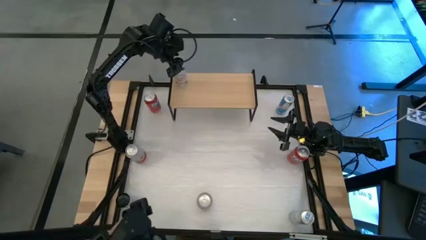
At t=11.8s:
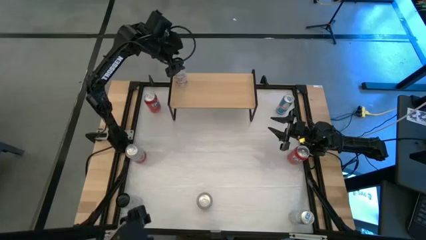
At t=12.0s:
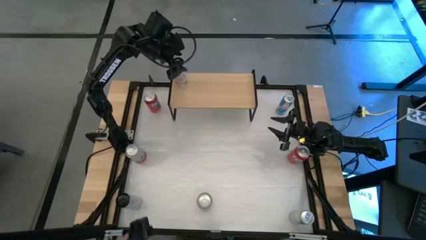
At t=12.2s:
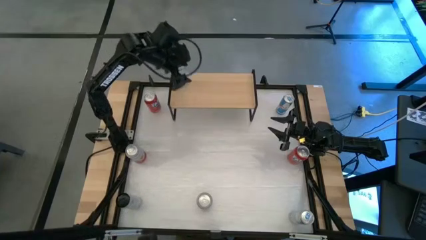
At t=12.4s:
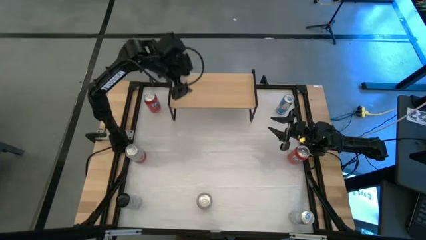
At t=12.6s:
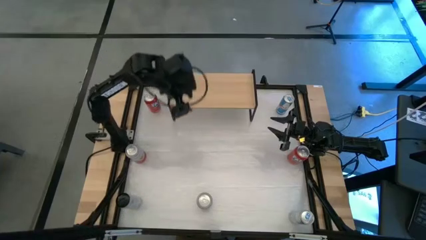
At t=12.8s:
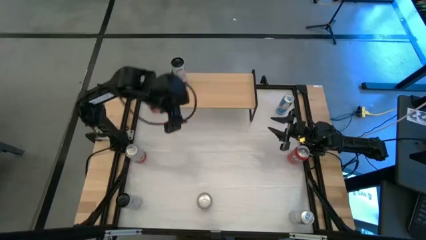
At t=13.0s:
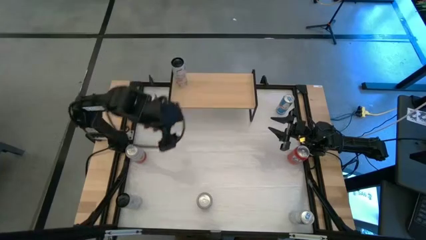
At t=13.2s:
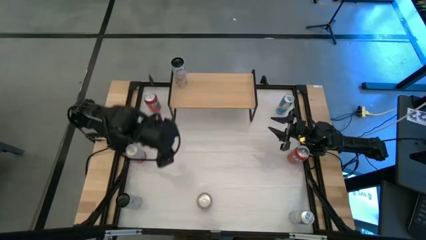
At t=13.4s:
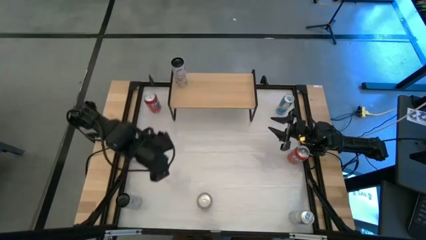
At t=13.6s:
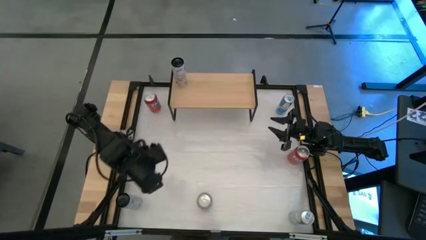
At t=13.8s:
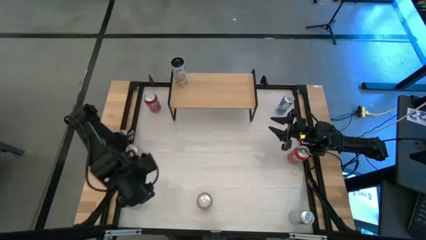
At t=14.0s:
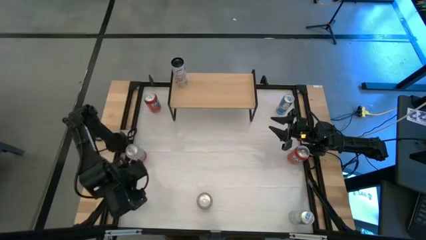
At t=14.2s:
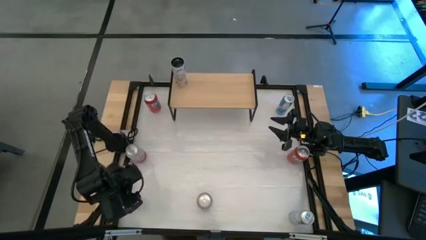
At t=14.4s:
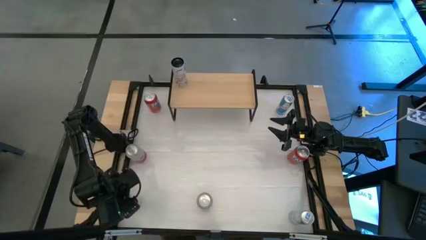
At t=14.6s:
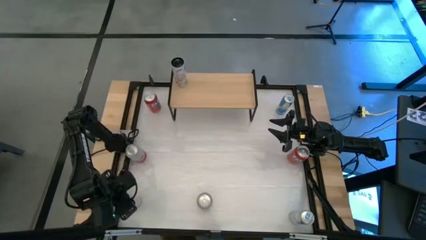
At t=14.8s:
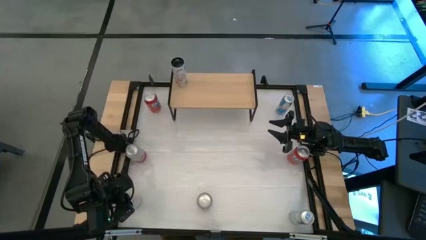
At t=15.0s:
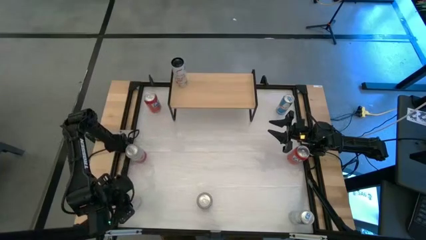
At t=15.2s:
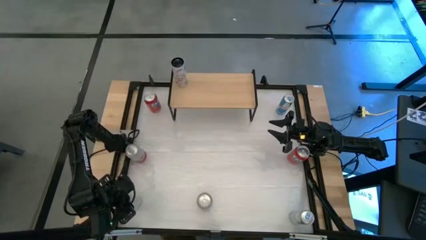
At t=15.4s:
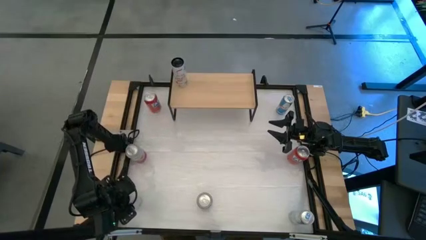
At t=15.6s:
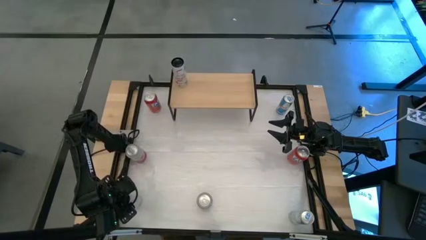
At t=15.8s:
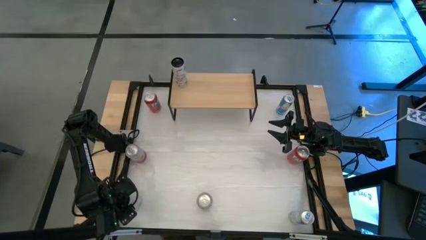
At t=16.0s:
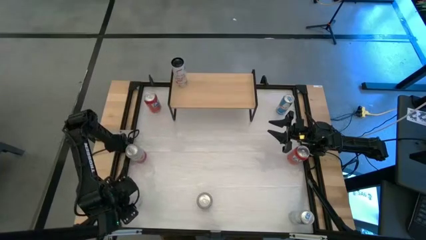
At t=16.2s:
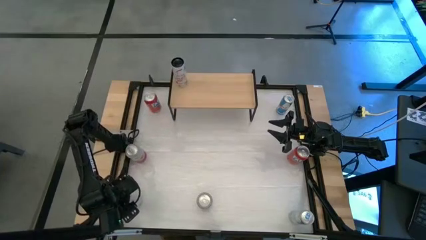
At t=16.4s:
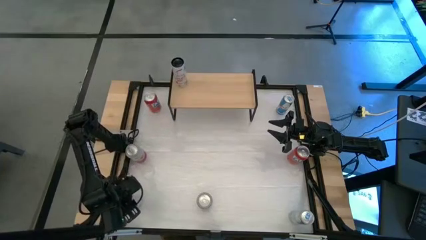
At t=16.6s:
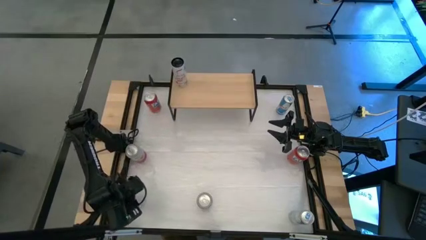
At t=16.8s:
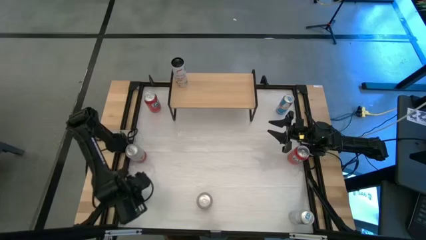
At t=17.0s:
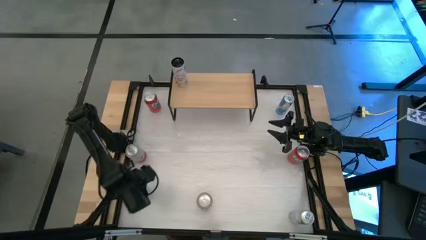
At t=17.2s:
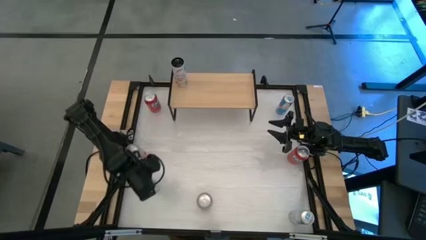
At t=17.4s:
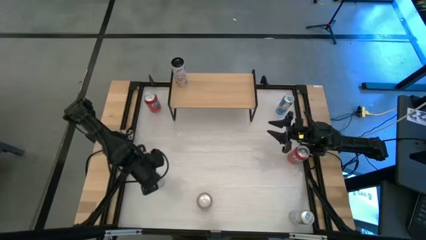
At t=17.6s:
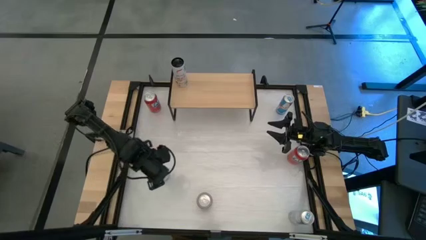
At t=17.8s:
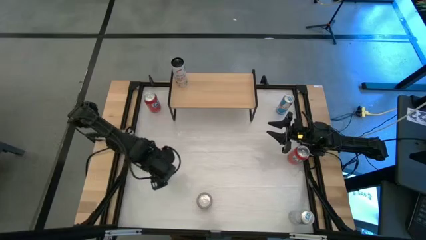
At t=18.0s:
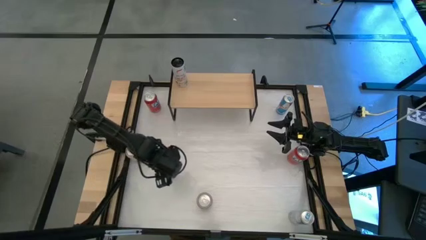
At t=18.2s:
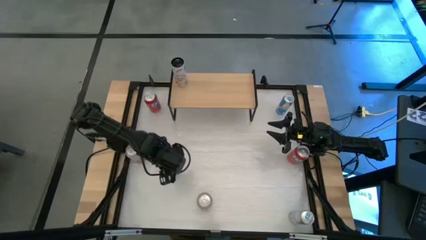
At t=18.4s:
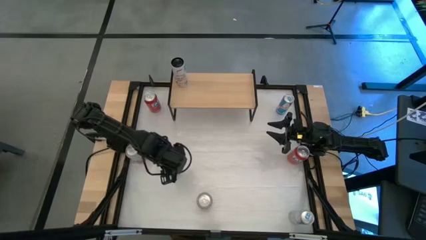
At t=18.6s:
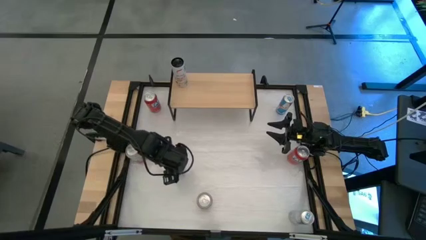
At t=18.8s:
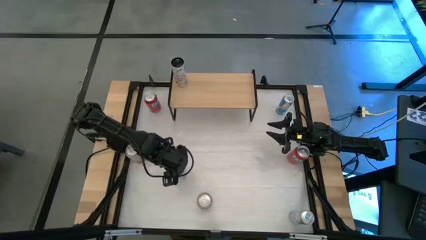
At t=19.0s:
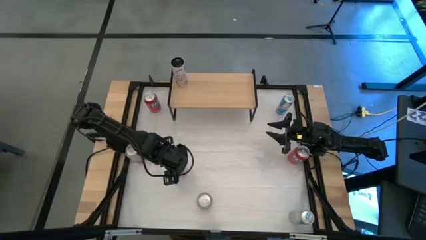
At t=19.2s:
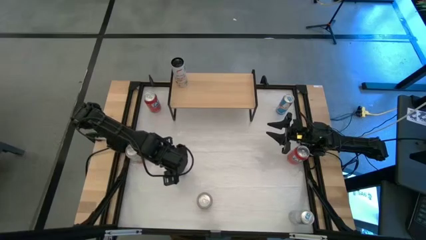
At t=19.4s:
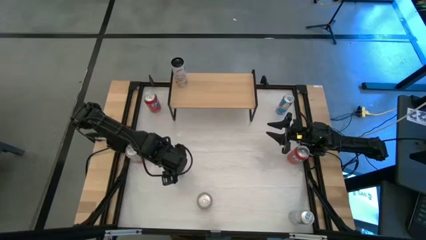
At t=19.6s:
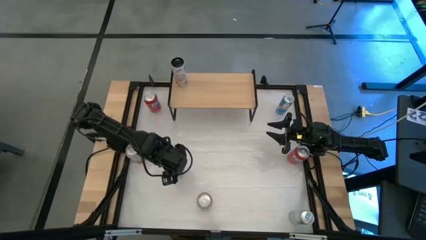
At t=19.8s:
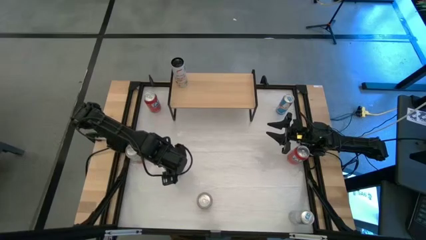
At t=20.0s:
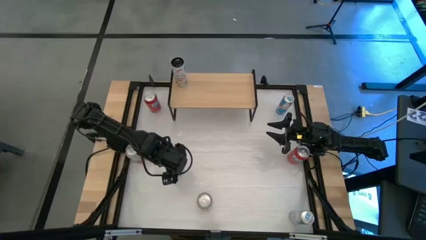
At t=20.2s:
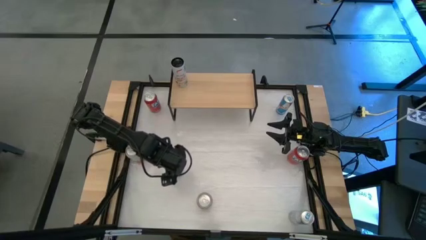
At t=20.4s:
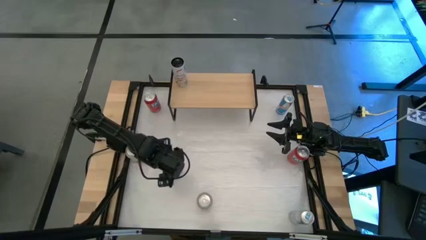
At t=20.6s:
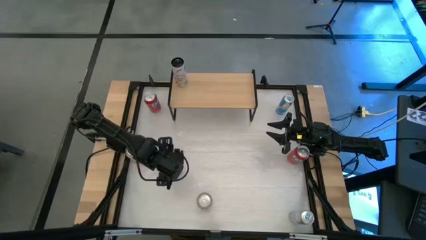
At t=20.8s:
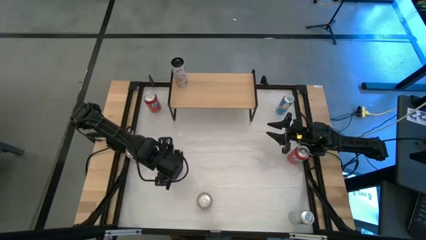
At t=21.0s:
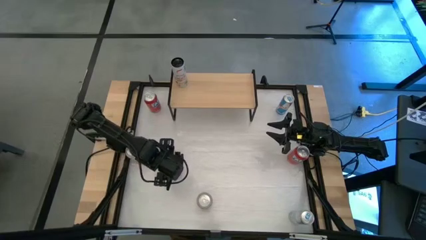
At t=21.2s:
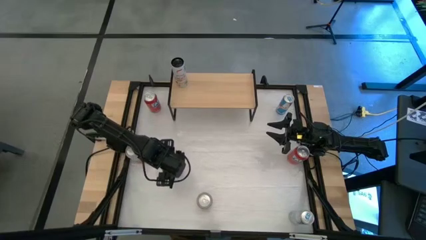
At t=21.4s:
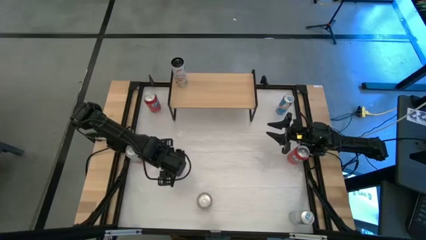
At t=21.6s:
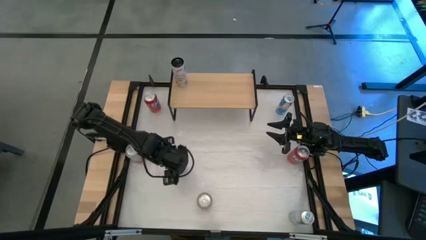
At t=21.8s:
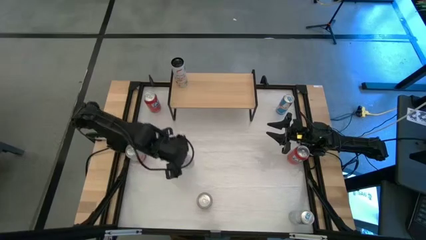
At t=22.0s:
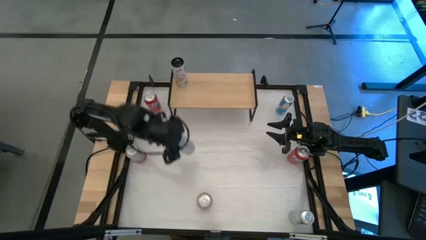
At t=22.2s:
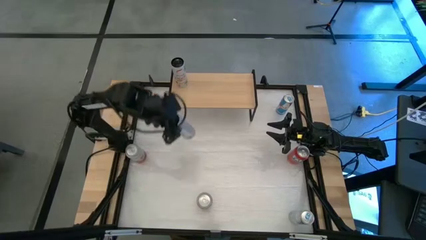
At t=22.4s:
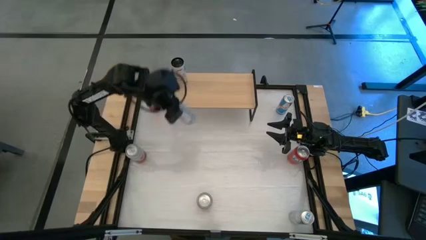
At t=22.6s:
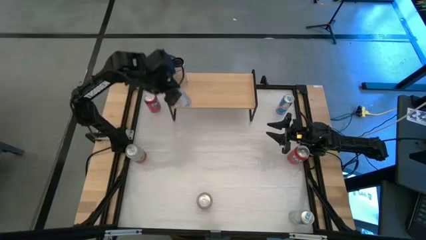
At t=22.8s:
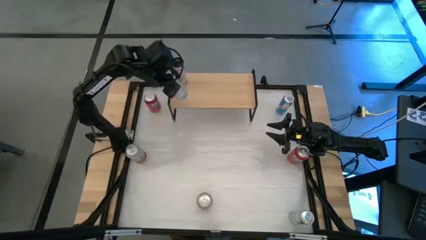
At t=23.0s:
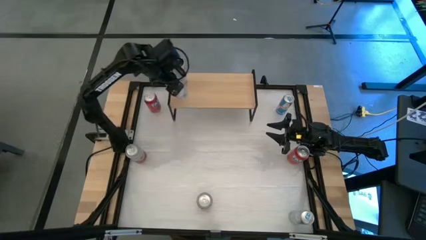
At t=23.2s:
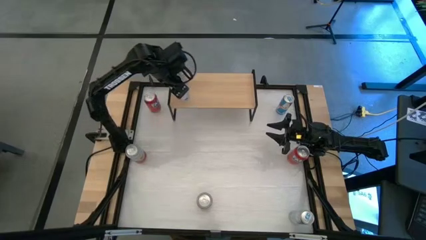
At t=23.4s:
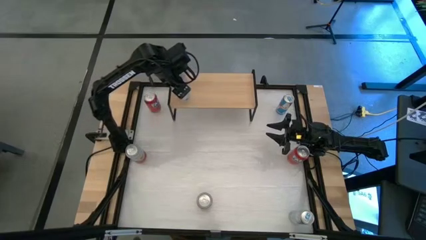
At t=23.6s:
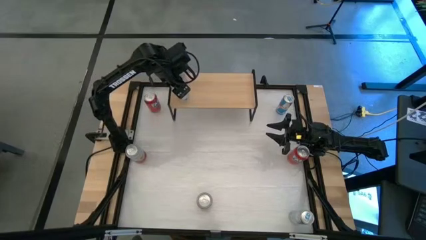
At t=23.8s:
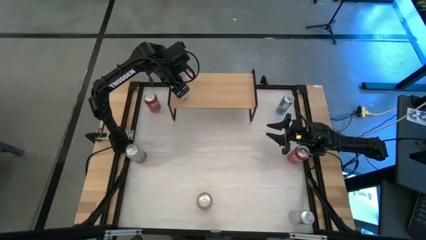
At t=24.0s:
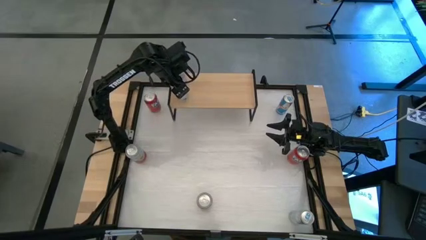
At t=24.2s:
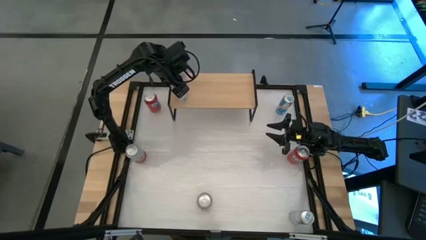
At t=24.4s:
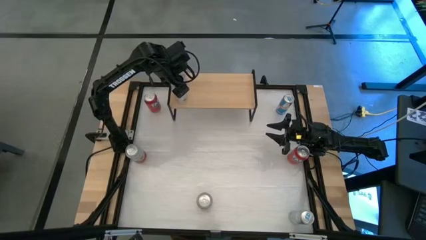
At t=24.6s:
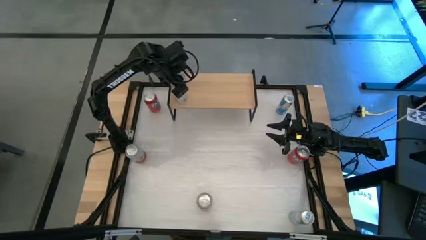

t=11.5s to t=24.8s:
Task: Place canned beverage on shelf
Put the white-pink soda can on the shelf
